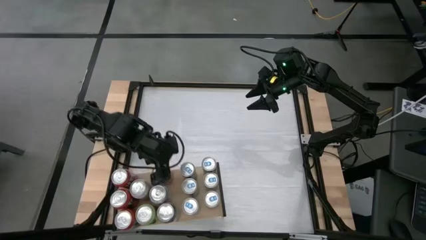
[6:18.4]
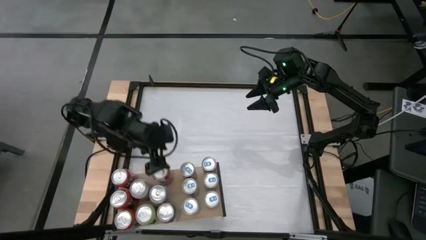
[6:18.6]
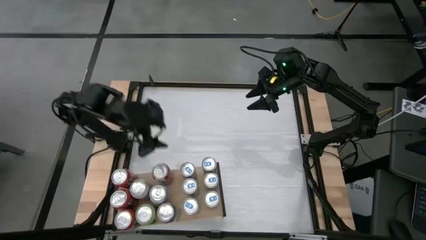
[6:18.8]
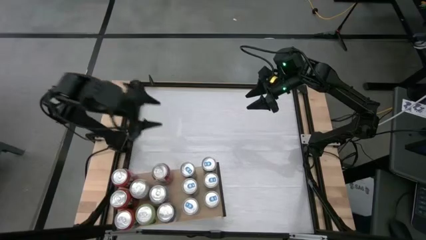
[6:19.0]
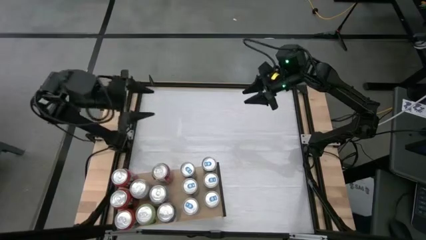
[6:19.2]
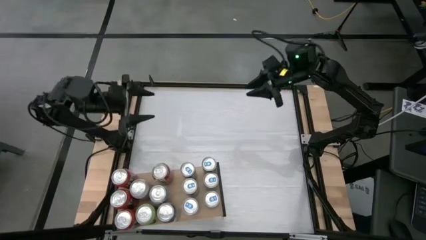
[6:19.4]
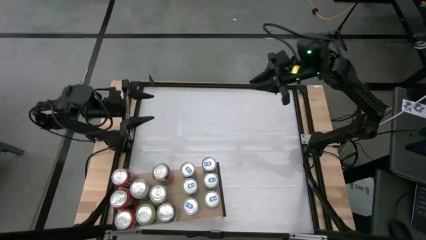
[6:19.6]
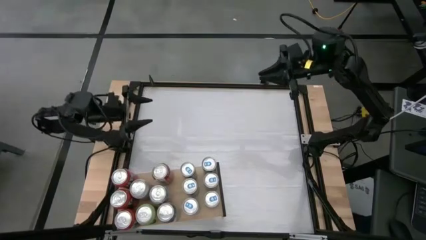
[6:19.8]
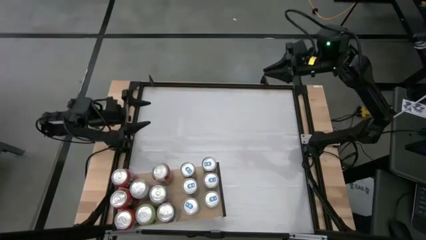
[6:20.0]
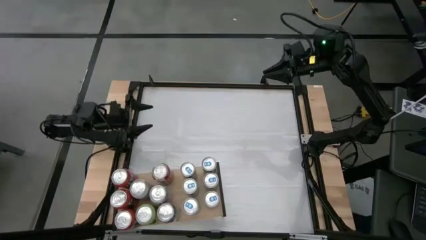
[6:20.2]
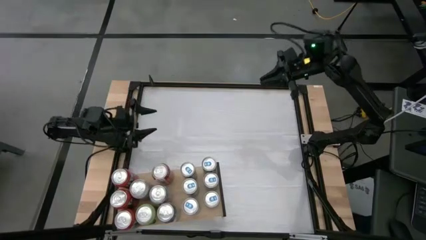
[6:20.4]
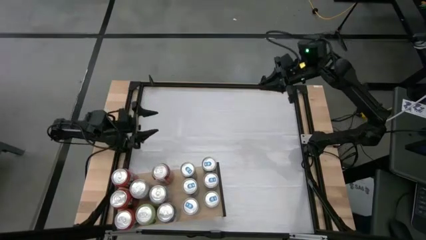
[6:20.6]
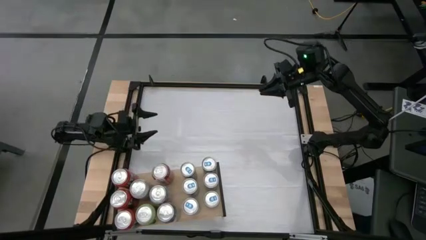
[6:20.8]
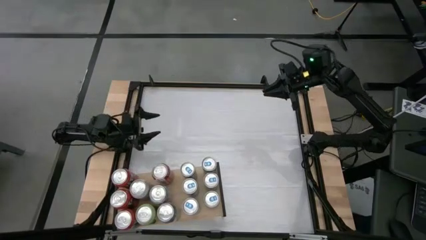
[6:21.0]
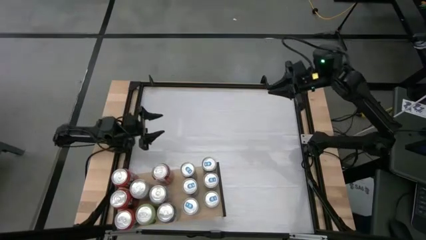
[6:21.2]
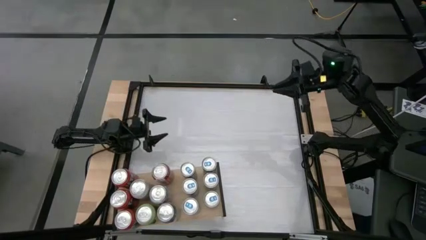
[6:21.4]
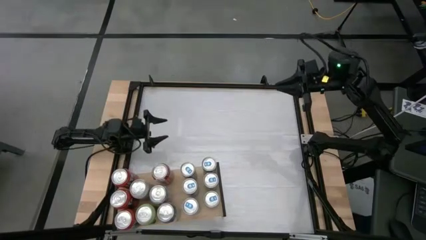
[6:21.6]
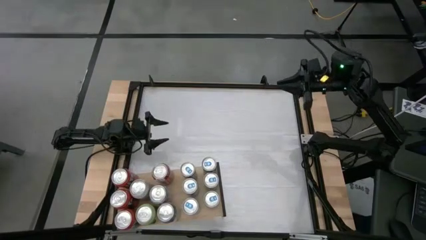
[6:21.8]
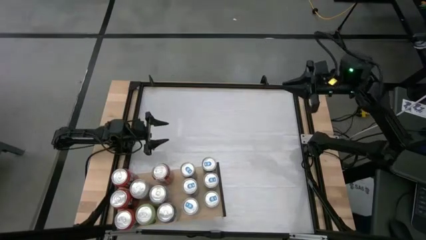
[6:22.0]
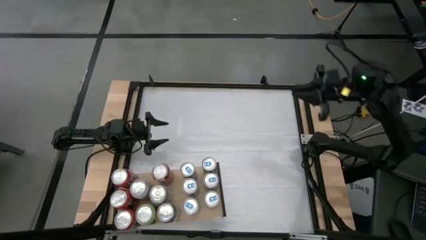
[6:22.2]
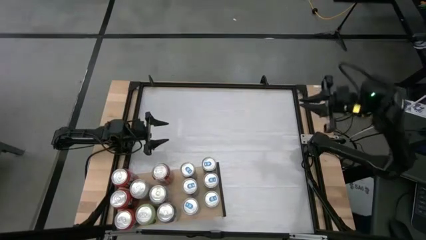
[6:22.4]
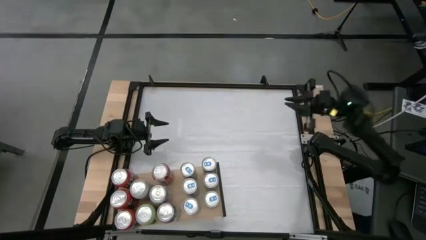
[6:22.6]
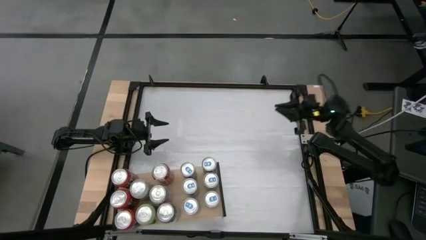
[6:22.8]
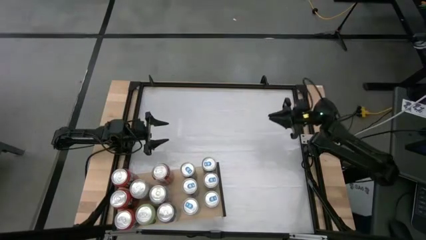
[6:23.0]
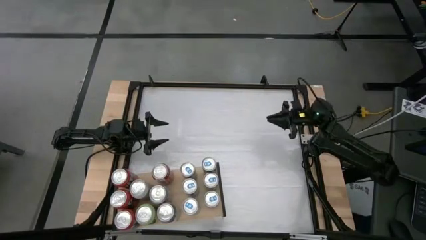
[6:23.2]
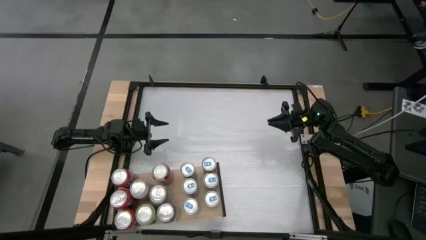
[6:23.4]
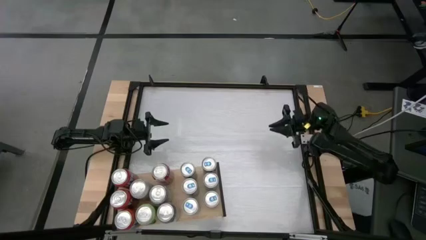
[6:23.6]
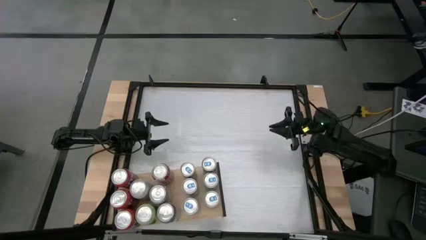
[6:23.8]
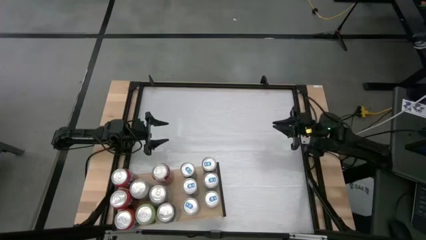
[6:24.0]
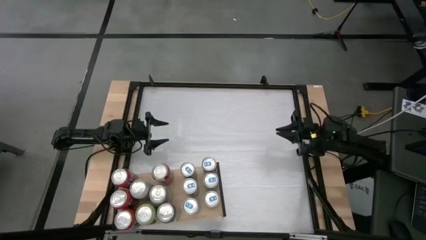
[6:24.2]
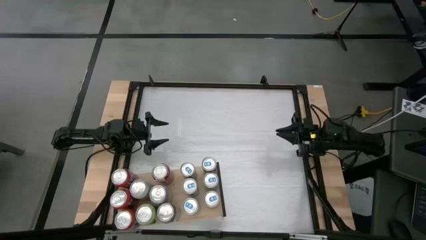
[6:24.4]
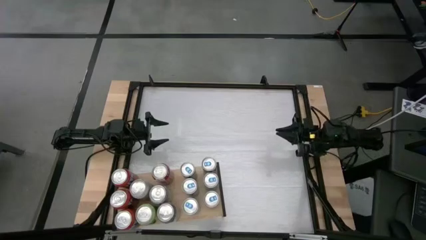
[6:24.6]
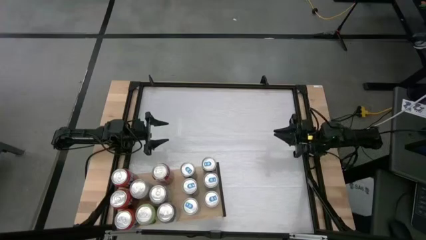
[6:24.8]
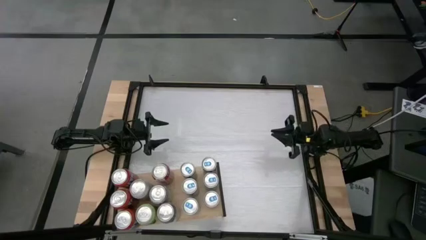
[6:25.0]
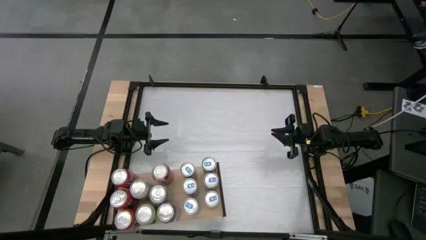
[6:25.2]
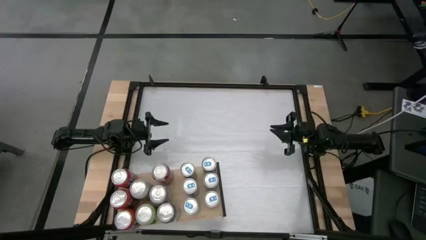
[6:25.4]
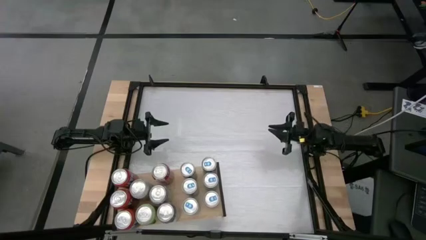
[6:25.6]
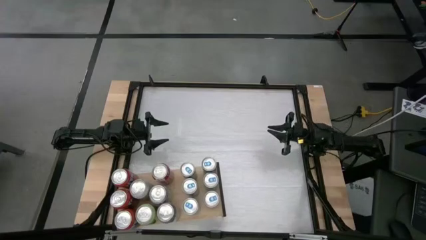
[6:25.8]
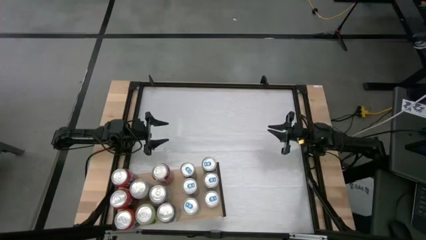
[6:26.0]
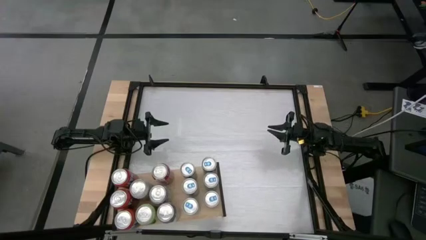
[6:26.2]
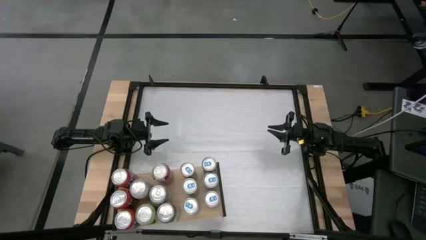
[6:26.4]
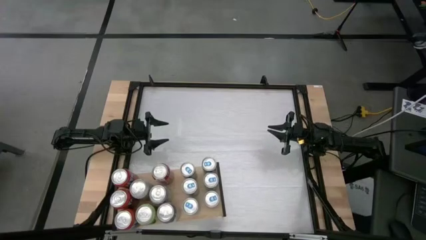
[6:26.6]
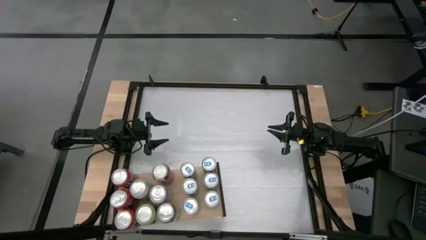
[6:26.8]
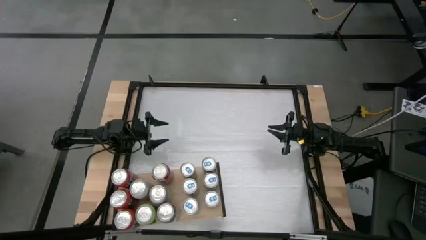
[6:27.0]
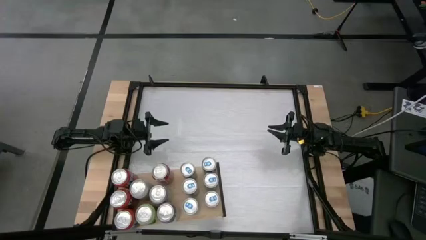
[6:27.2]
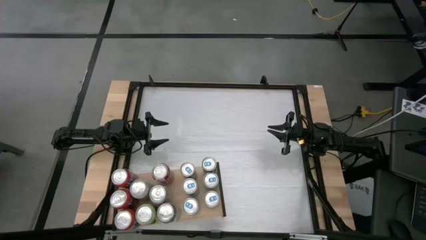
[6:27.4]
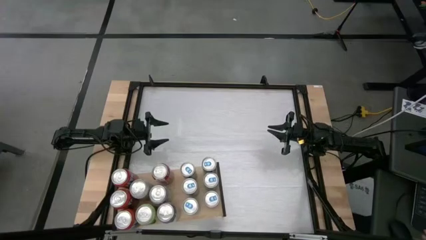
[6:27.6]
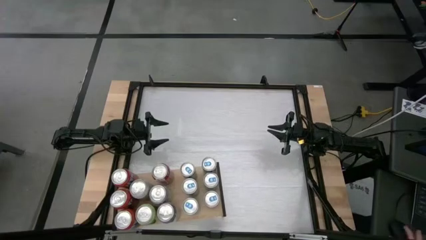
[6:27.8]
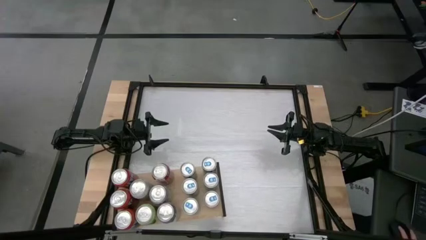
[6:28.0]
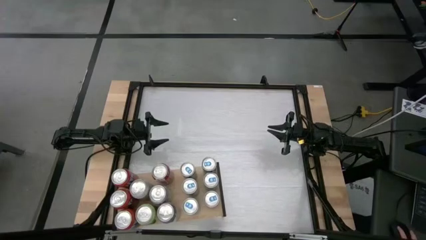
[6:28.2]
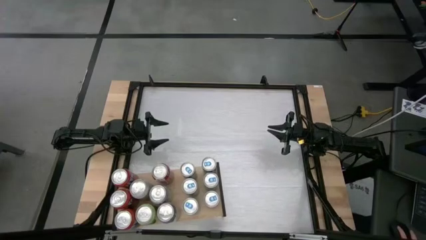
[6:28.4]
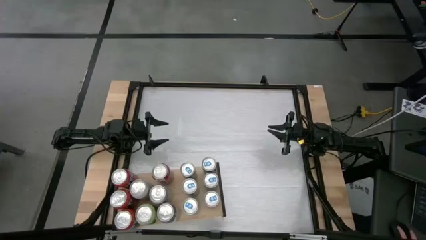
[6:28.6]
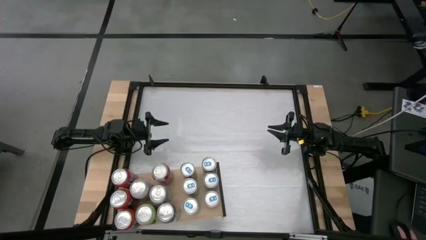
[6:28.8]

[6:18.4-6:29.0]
Task: Place canned beverage on shelf
Return to Home Position

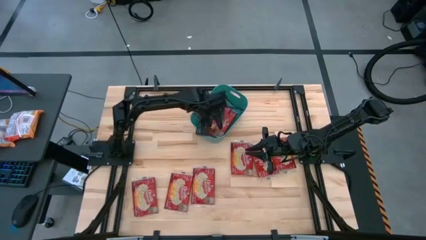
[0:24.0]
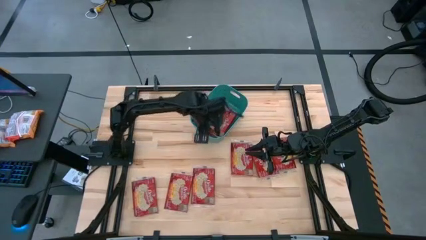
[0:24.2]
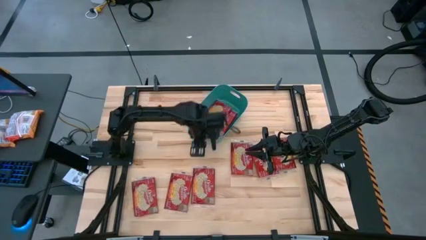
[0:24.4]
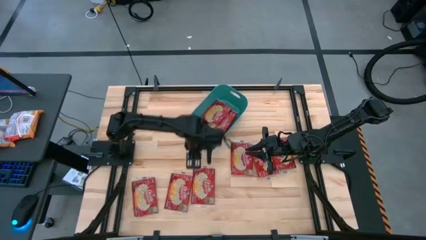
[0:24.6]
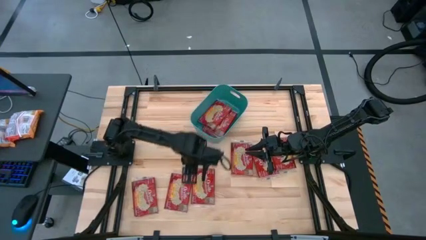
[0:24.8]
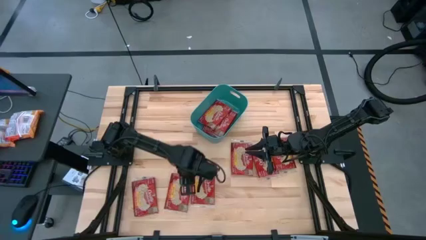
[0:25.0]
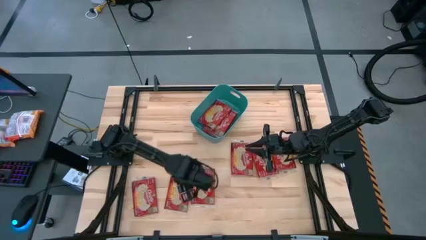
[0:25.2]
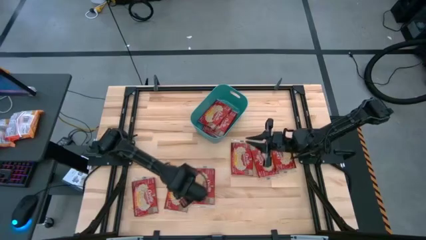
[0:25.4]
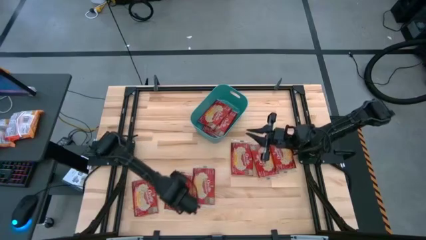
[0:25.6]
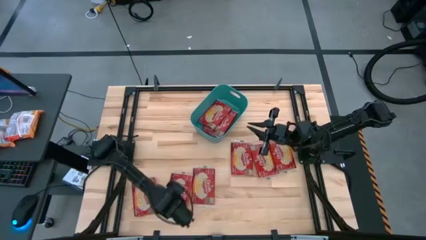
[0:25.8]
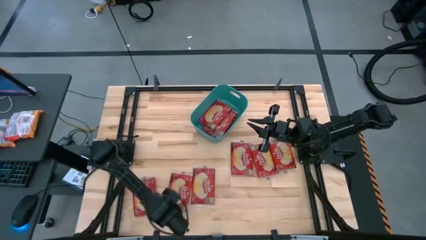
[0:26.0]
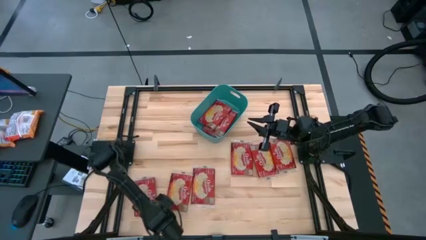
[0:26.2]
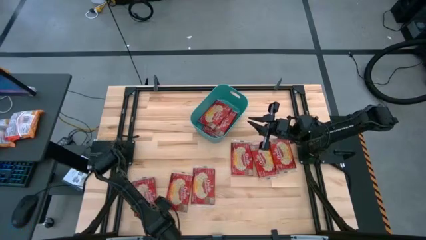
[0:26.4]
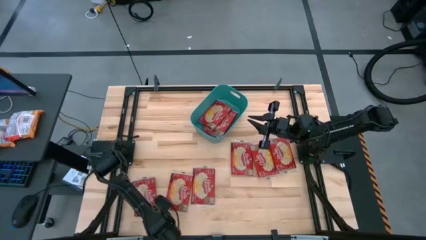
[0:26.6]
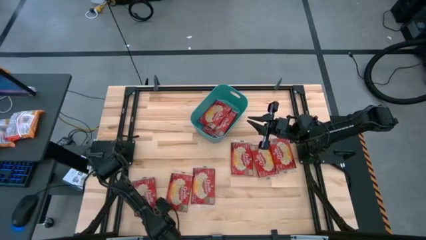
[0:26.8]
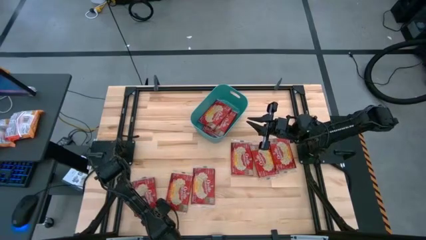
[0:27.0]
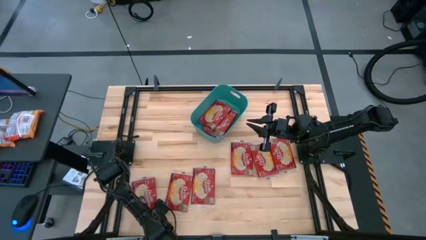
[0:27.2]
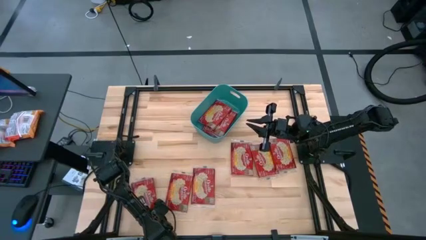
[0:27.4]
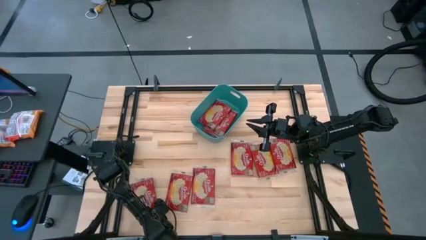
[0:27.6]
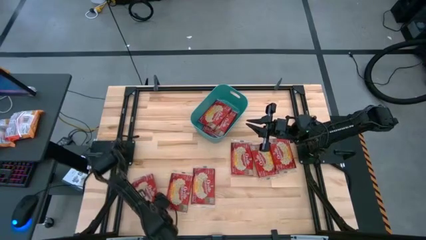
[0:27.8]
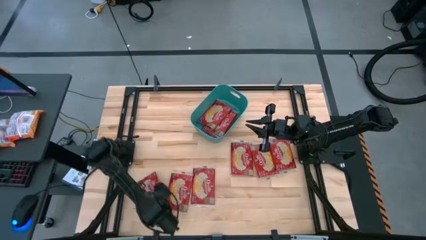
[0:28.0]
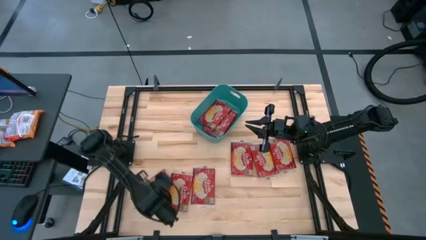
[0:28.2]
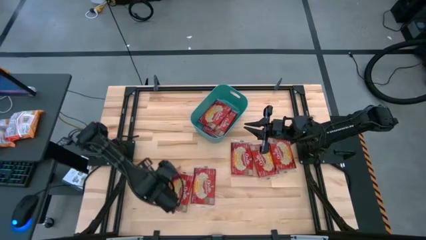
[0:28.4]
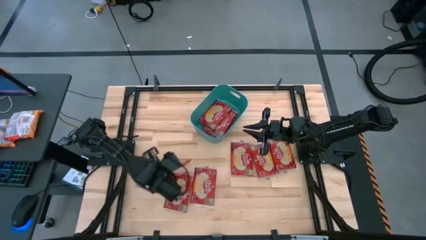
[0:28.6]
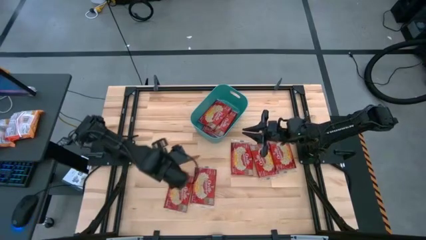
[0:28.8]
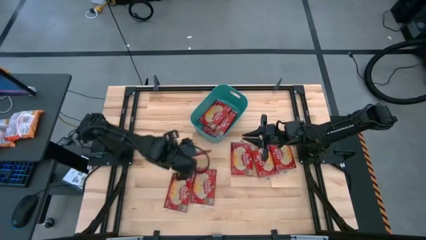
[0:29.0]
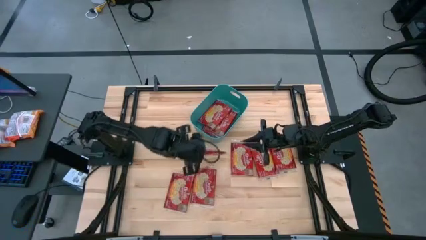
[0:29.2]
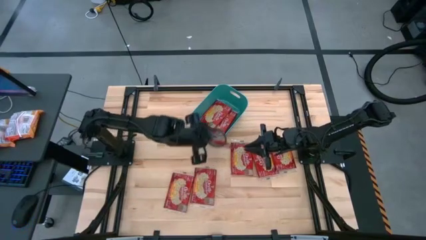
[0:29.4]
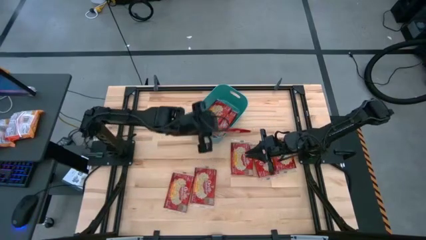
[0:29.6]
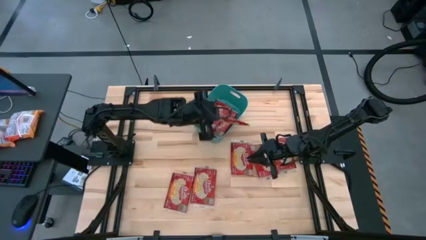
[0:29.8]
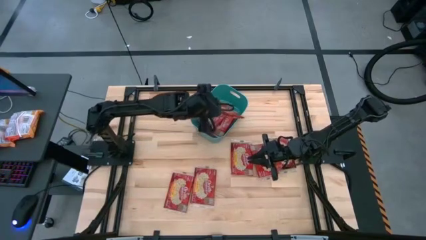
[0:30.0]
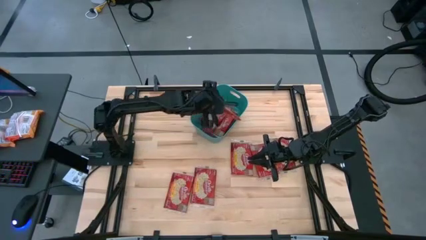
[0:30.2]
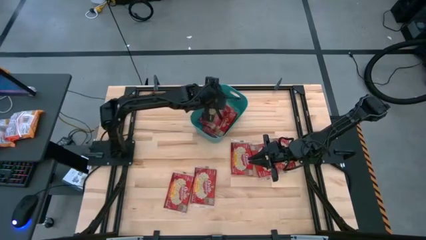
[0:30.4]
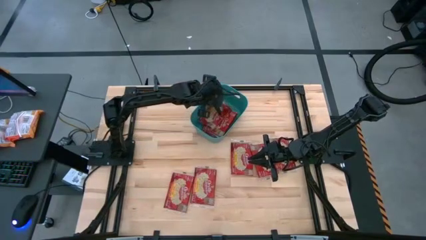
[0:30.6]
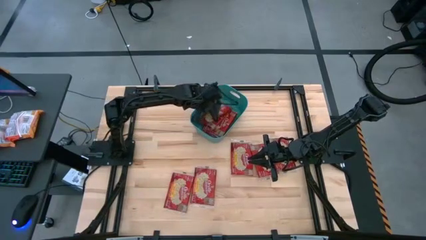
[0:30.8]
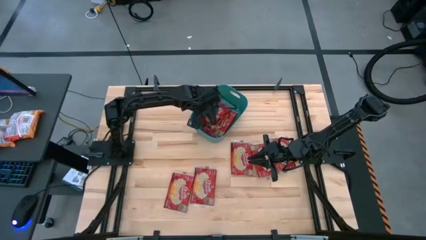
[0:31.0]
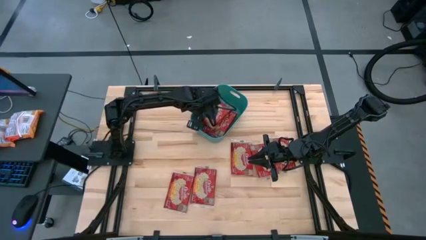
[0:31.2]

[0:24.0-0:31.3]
Task: Sort popcorn bags into baskets
Put the popcorn pack into the blue bin
